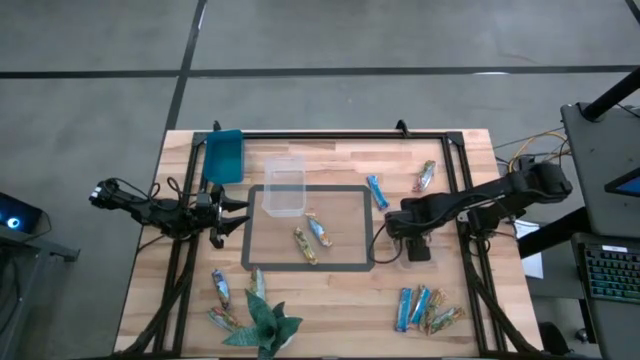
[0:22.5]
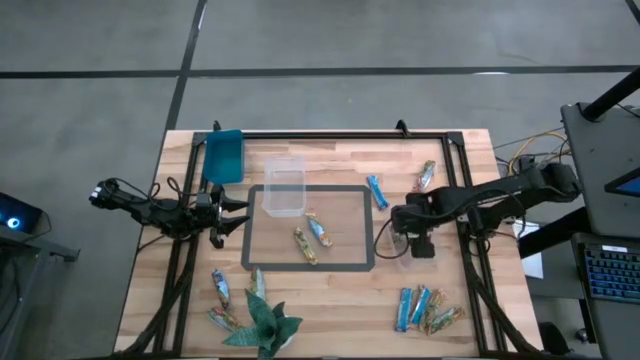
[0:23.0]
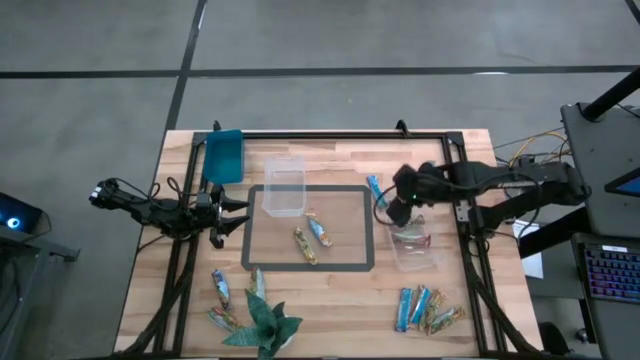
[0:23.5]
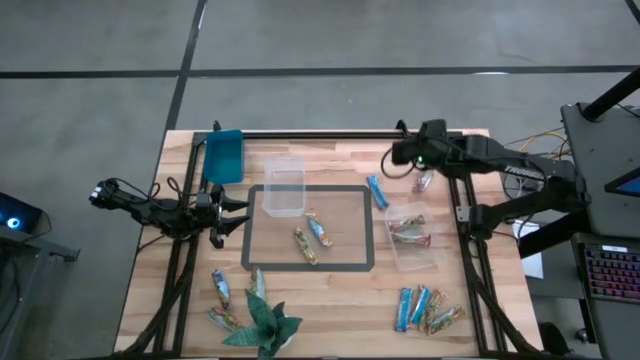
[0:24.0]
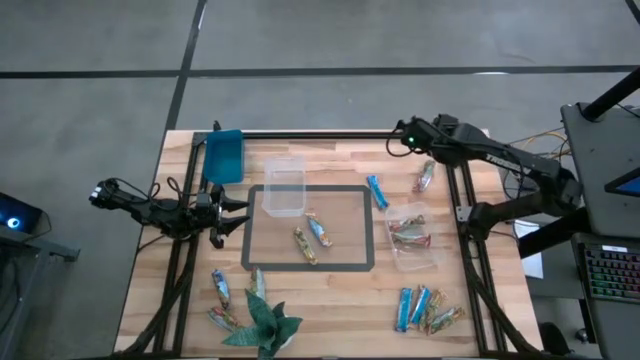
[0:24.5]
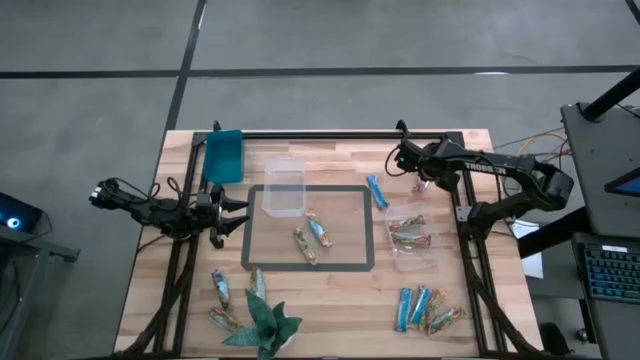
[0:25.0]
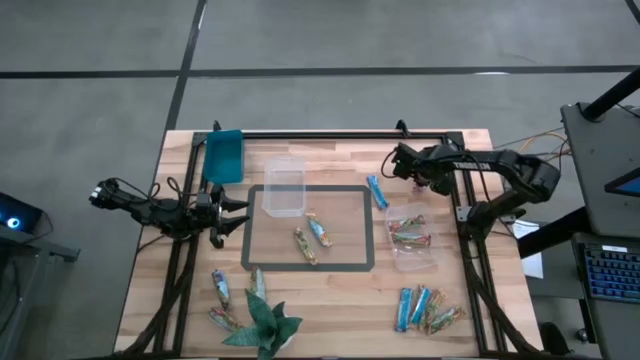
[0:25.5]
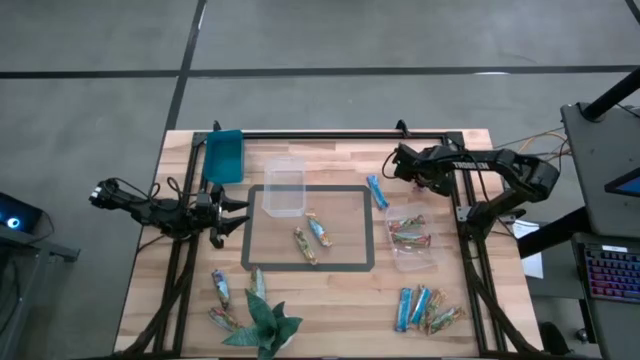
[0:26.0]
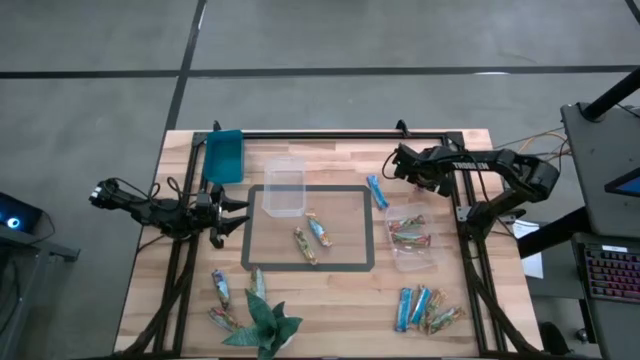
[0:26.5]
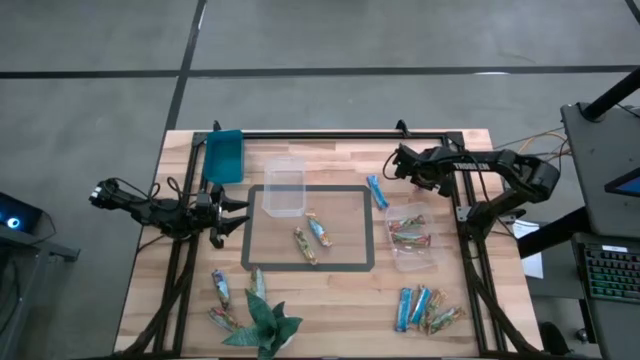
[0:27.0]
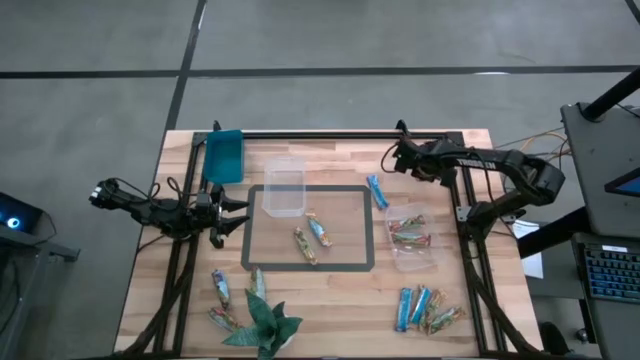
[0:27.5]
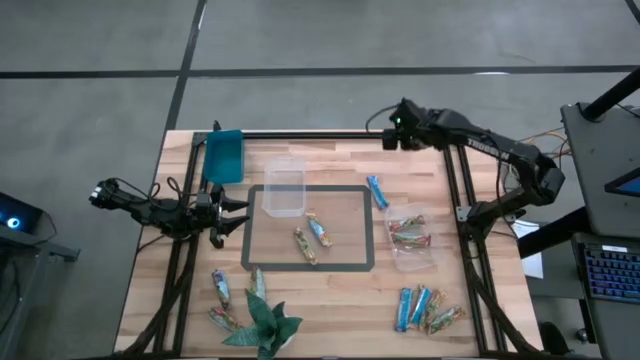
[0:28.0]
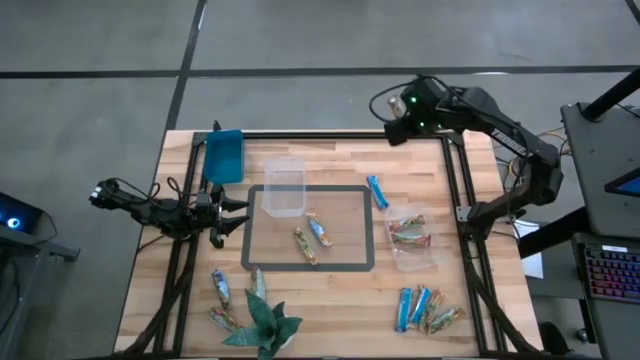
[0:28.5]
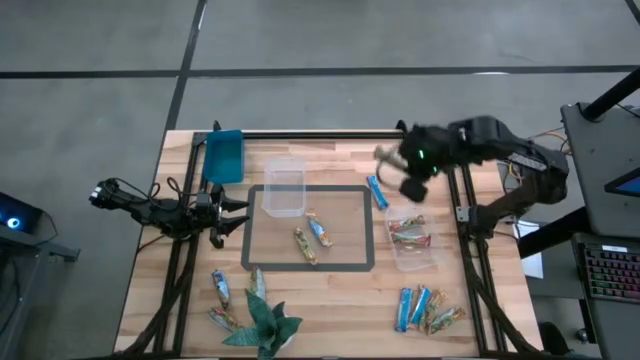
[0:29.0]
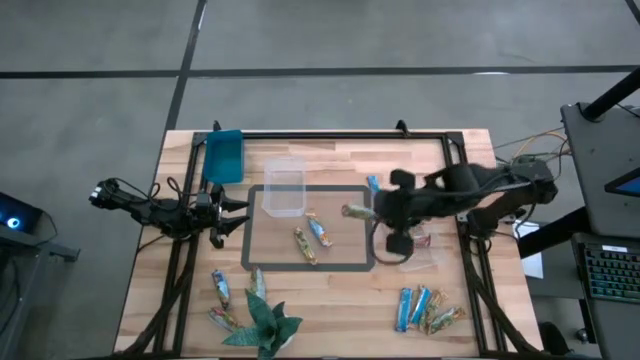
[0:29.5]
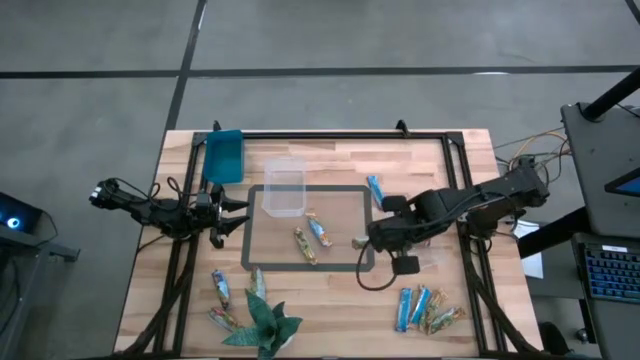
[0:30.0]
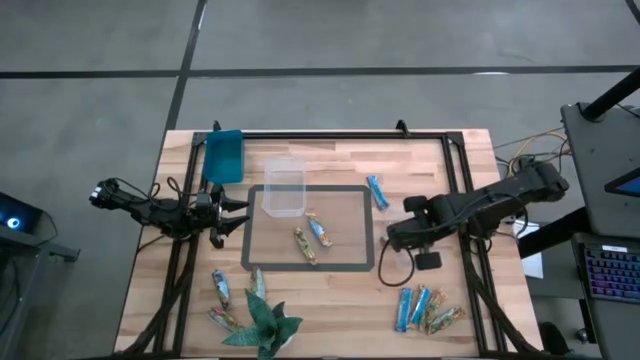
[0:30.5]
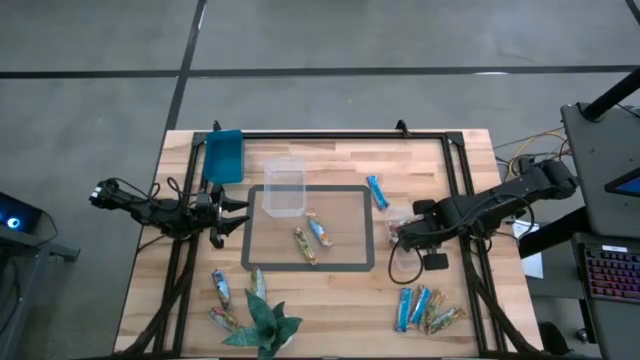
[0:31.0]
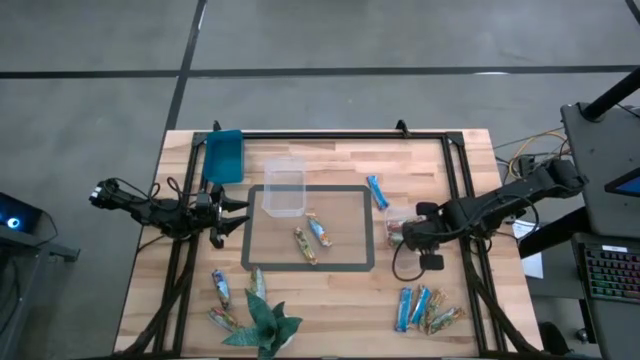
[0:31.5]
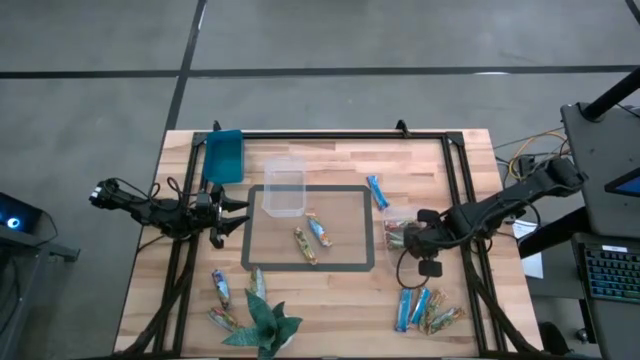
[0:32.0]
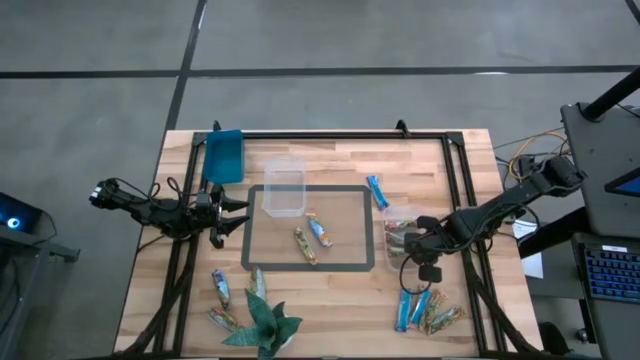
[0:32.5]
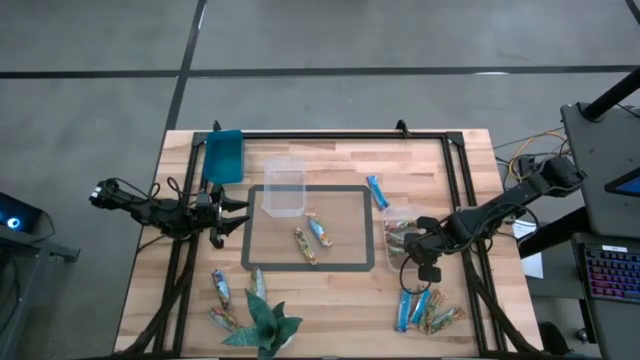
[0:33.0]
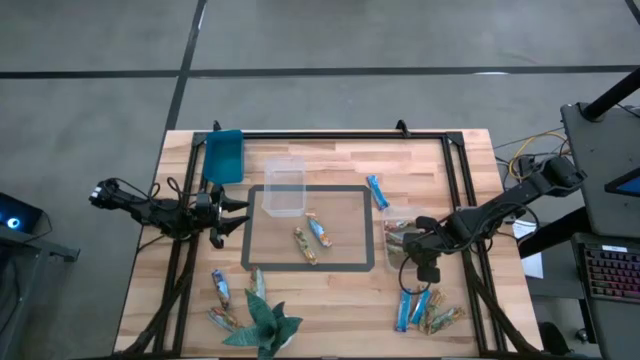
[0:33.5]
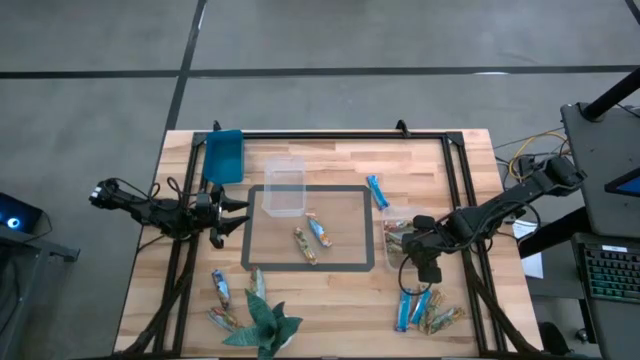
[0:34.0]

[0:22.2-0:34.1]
Task: Pick and place Granola Bars by type
Put the red granola bar into the right transparent bin

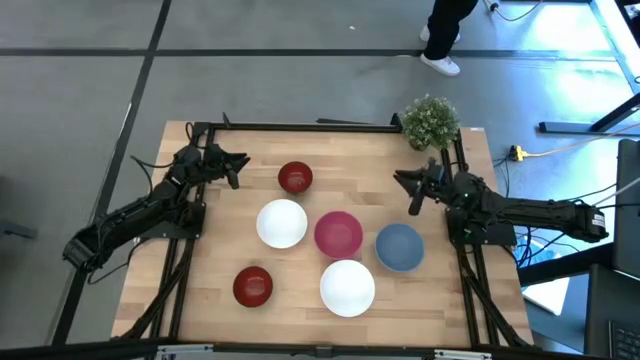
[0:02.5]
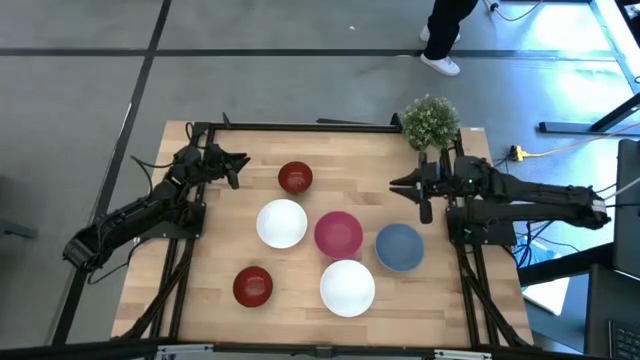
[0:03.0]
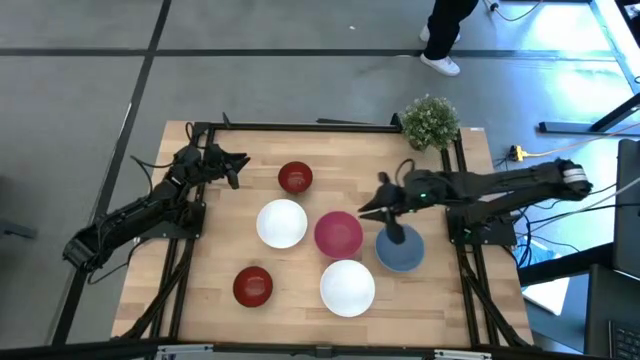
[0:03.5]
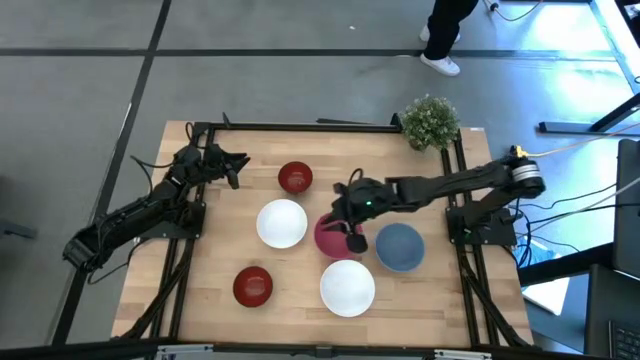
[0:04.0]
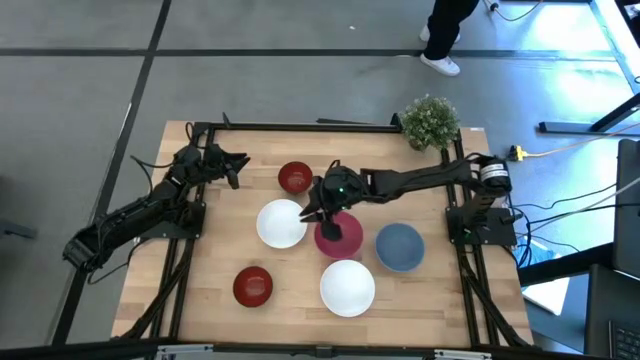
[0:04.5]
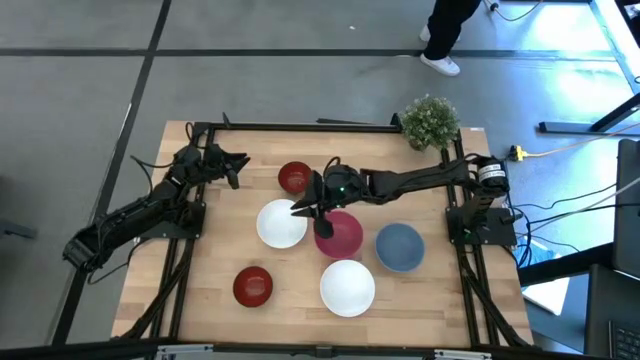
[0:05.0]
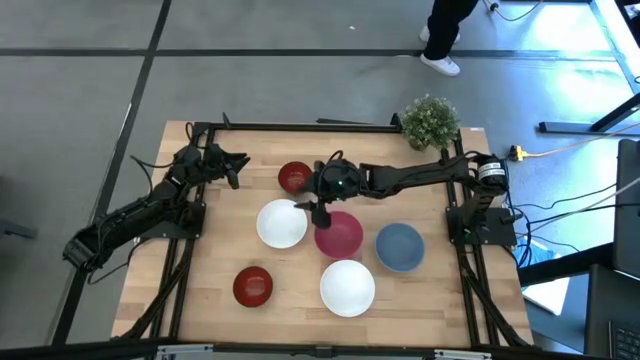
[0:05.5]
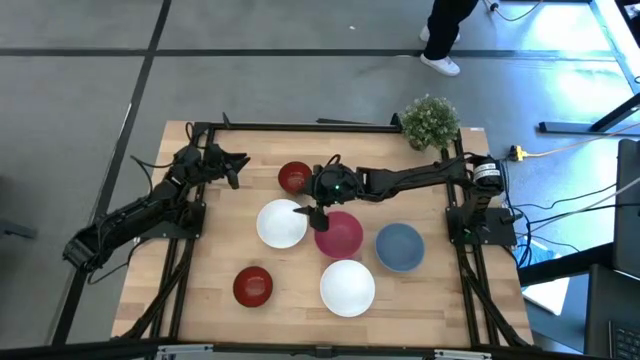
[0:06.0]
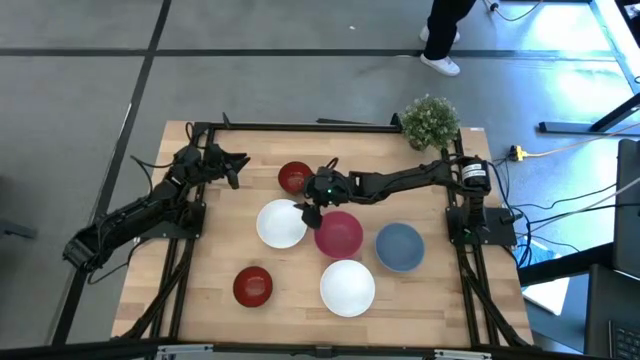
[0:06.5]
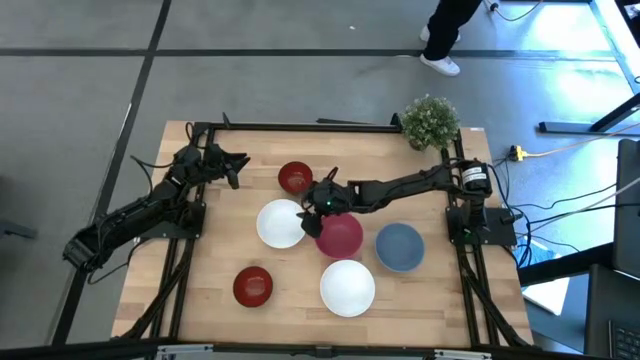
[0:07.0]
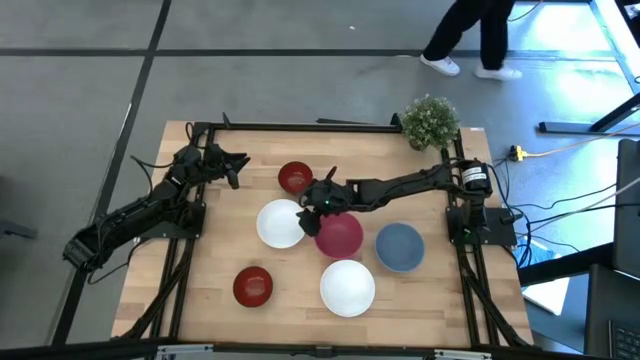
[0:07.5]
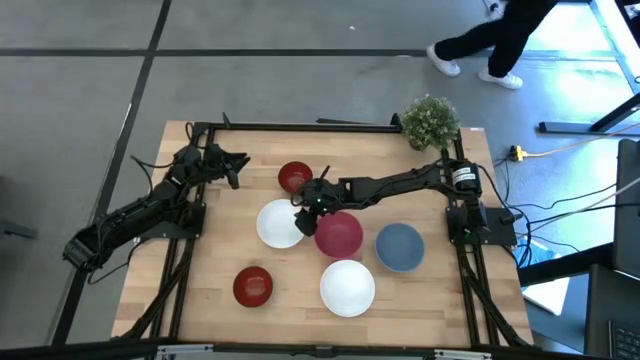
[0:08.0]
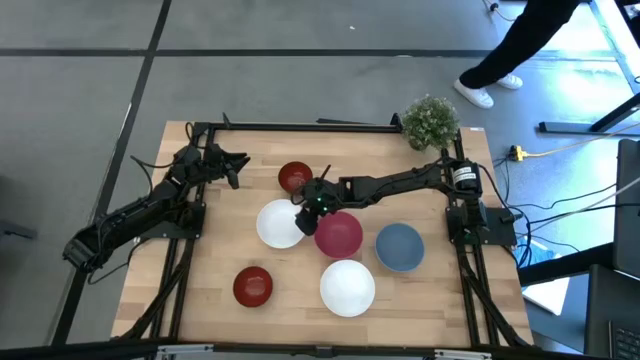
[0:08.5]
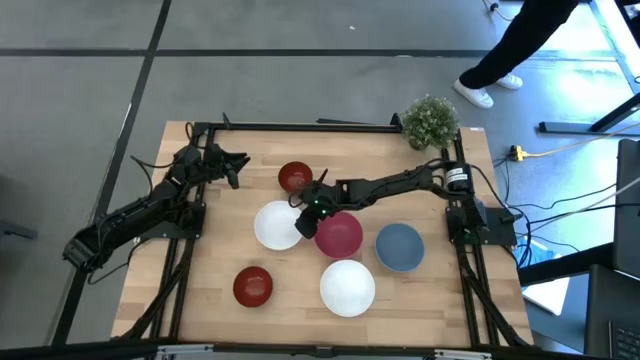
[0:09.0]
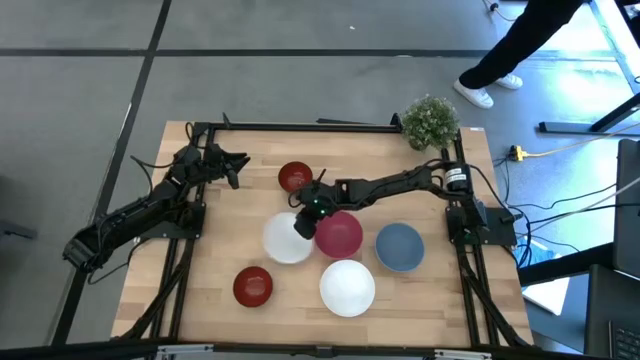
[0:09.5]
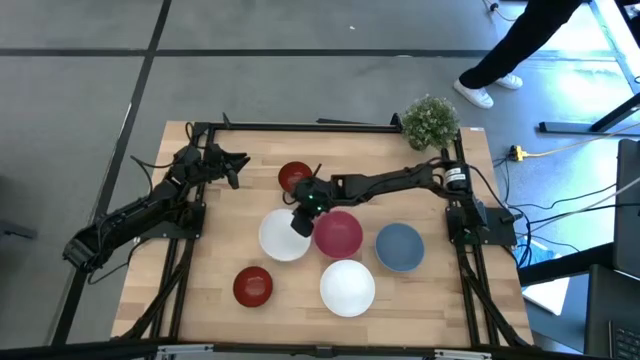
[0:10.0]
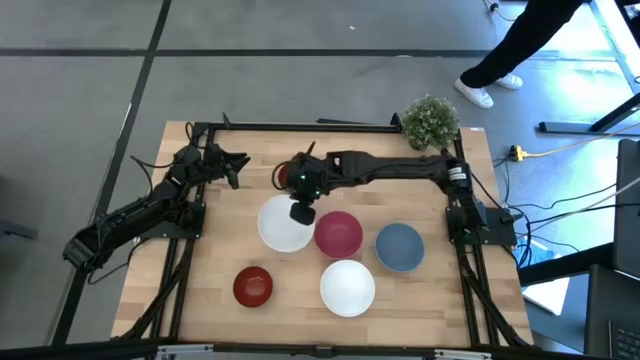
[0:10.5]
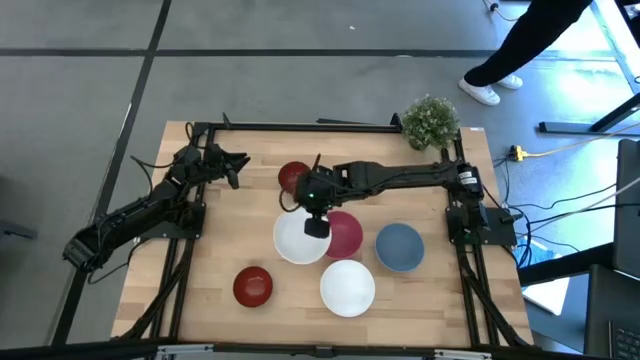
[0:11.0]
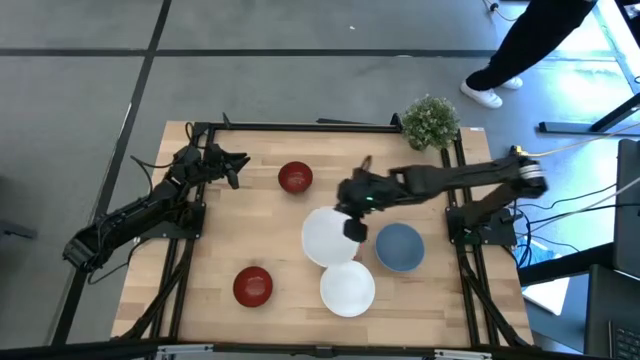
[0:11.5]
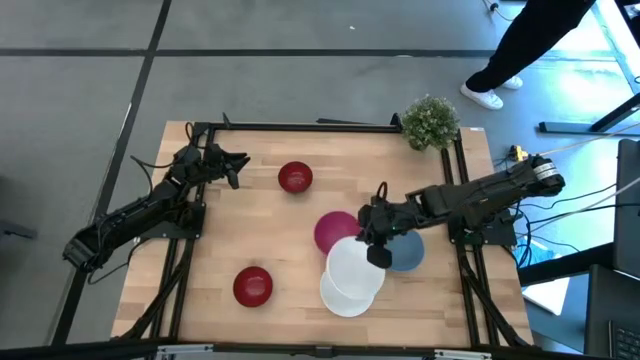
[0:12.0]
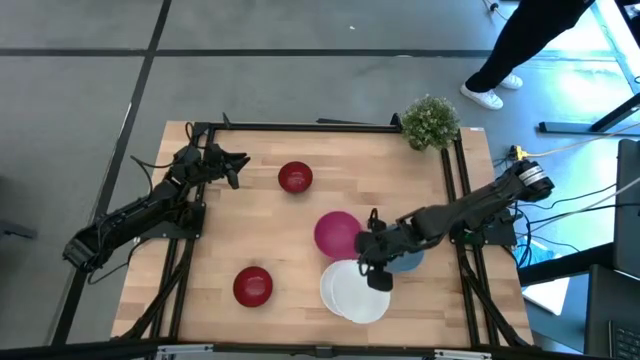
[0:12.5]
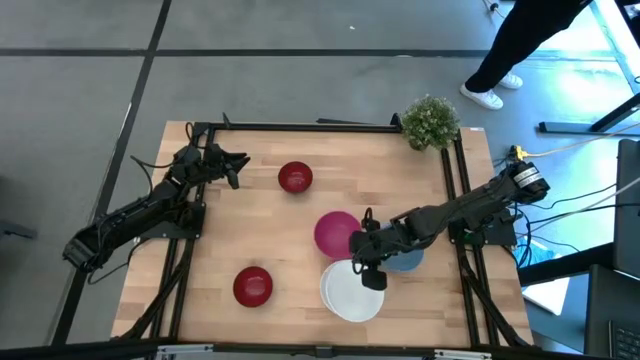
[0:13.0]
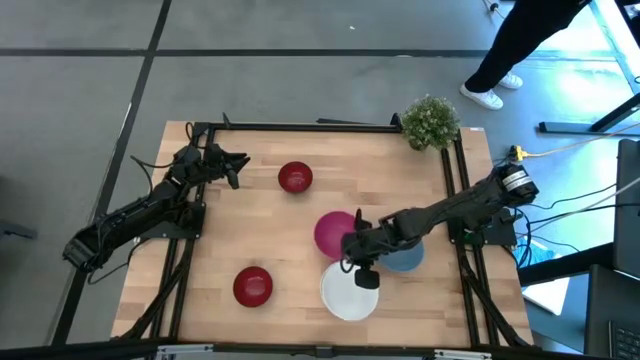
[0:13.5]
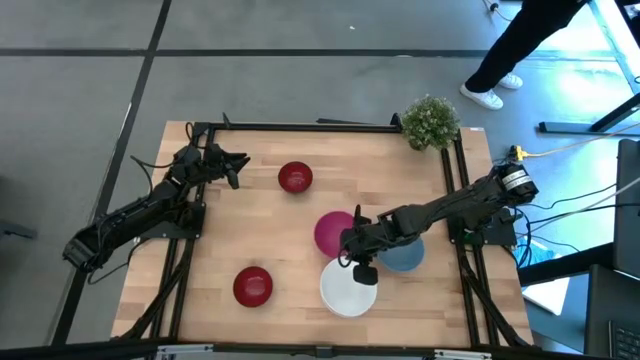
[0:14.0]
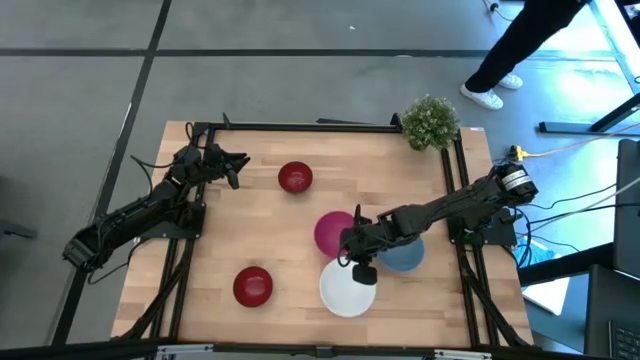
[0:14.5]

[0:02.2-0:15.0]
Task: Nest bowls inside each other
Stack the top white bowl on the bottom white bowl
